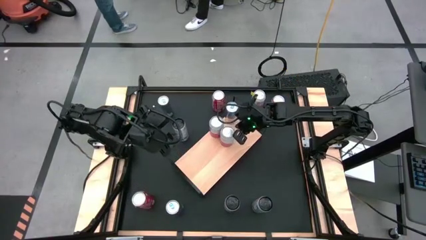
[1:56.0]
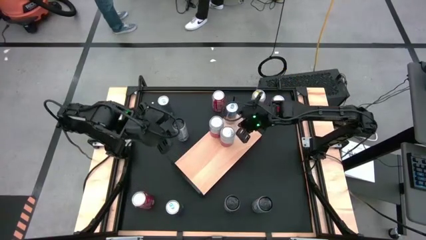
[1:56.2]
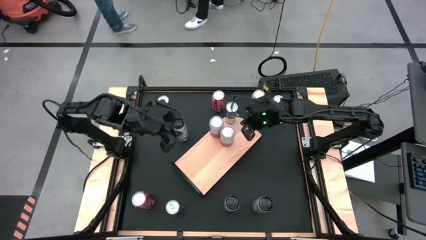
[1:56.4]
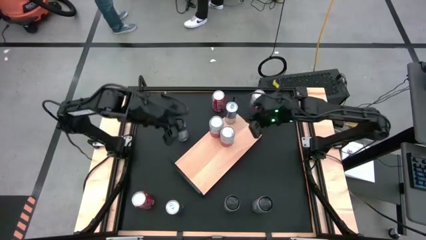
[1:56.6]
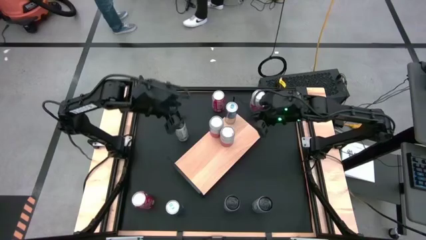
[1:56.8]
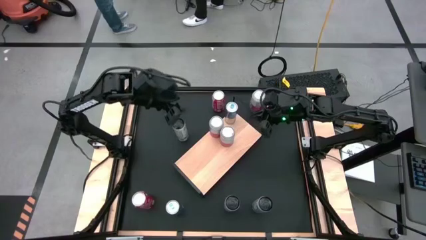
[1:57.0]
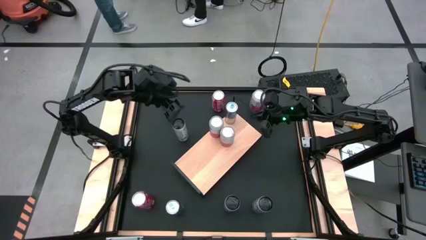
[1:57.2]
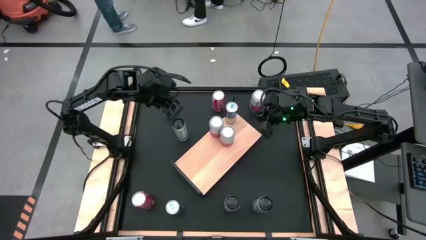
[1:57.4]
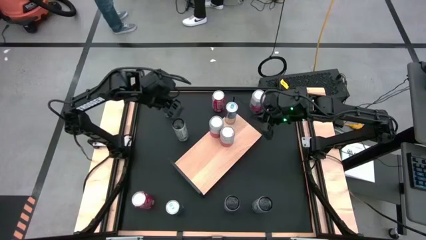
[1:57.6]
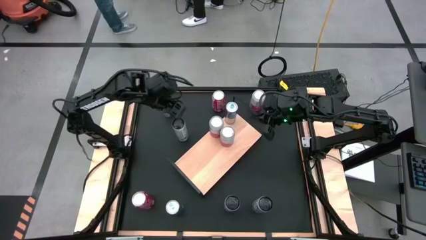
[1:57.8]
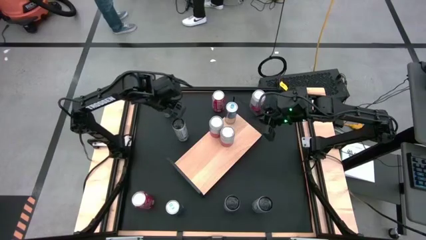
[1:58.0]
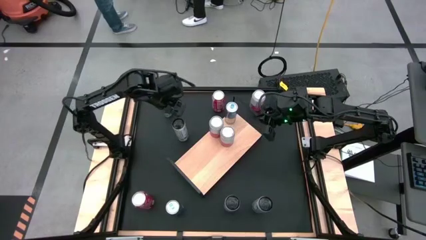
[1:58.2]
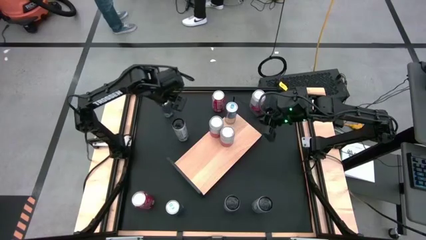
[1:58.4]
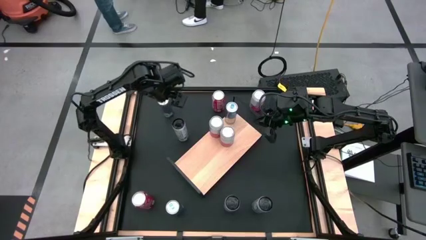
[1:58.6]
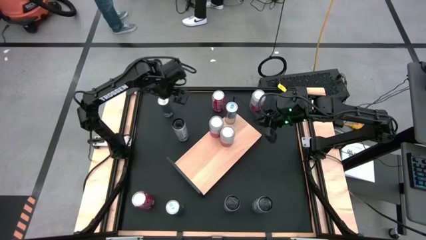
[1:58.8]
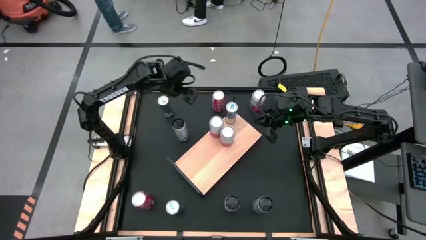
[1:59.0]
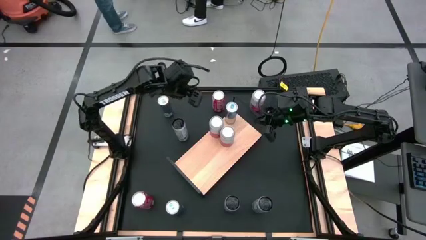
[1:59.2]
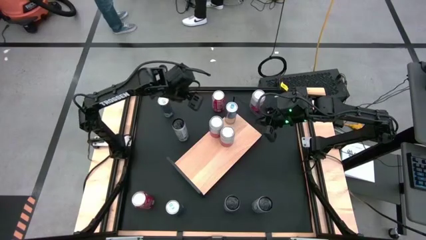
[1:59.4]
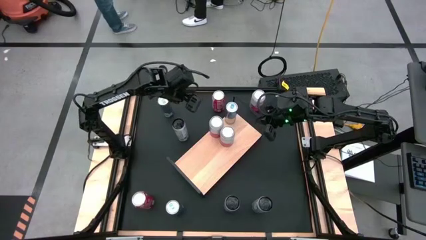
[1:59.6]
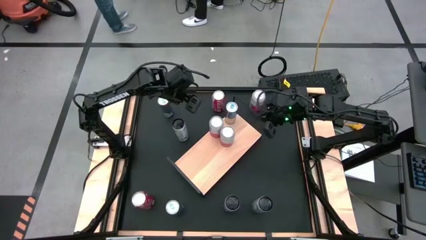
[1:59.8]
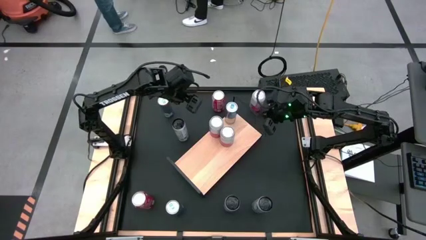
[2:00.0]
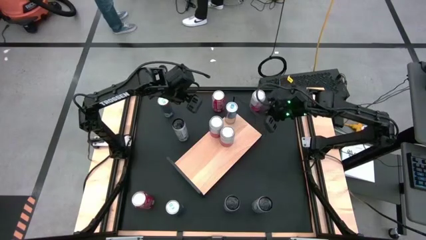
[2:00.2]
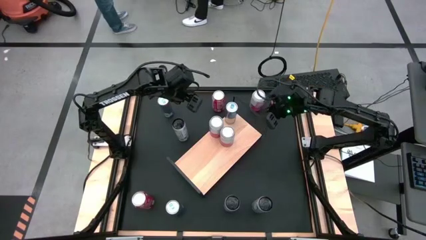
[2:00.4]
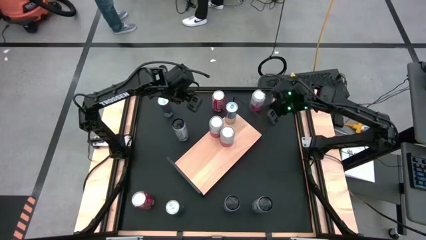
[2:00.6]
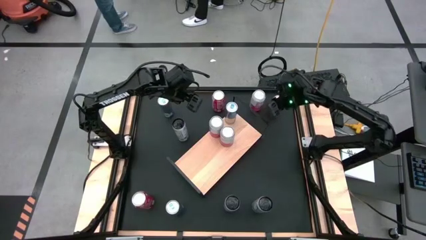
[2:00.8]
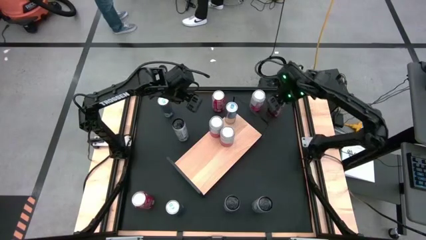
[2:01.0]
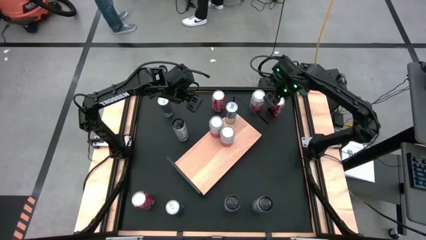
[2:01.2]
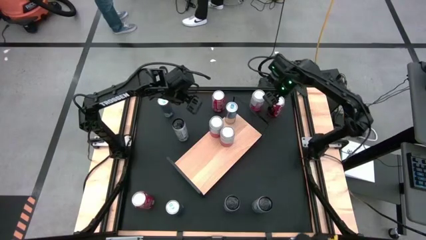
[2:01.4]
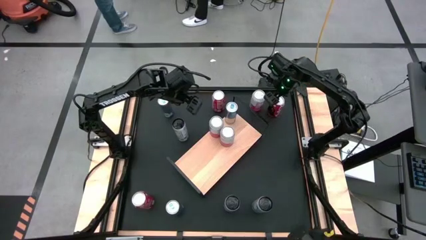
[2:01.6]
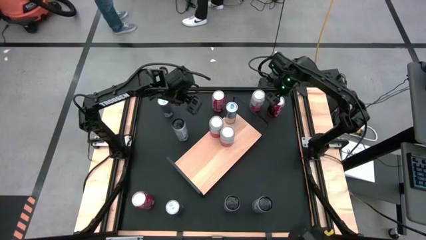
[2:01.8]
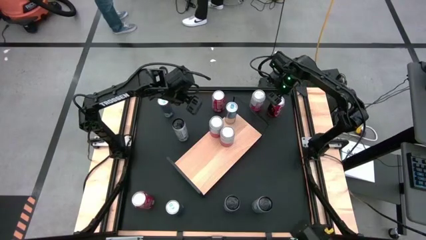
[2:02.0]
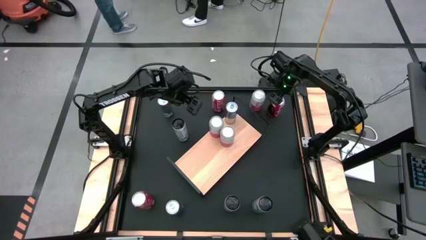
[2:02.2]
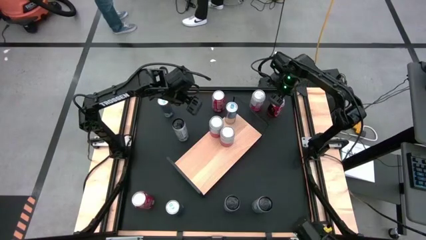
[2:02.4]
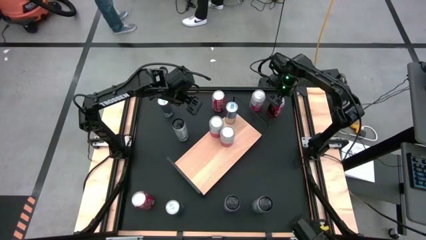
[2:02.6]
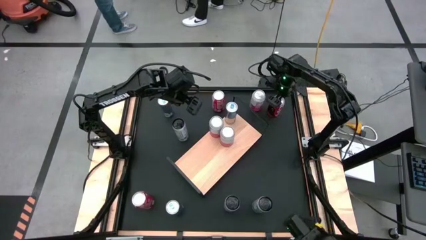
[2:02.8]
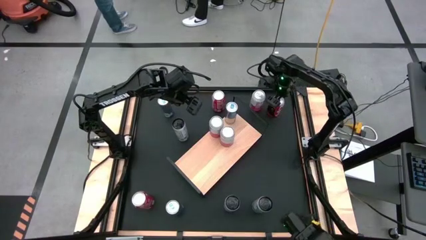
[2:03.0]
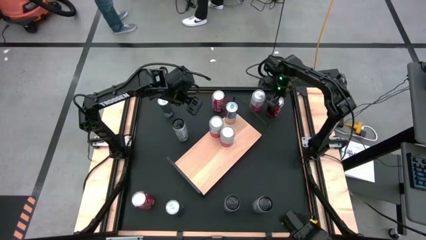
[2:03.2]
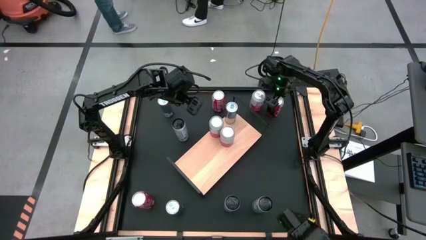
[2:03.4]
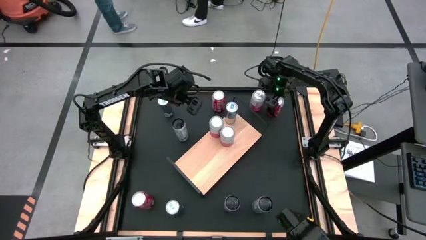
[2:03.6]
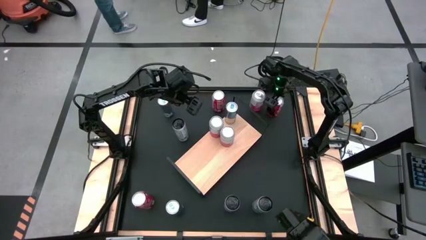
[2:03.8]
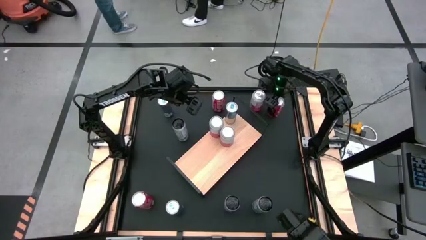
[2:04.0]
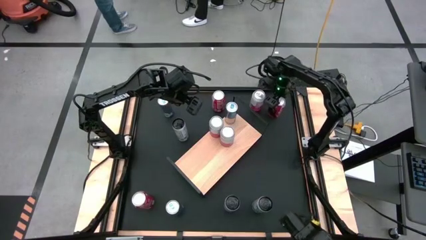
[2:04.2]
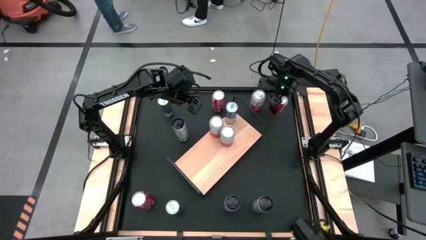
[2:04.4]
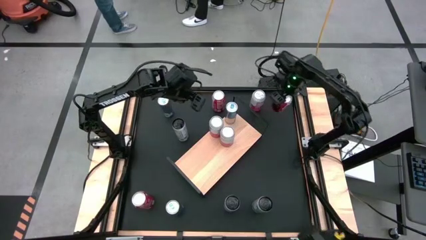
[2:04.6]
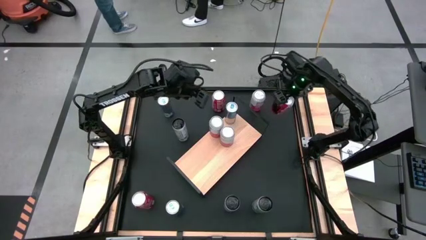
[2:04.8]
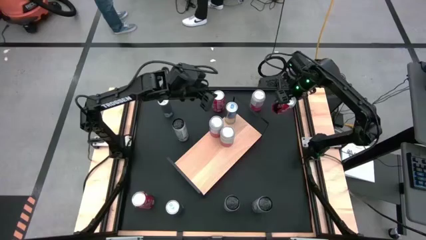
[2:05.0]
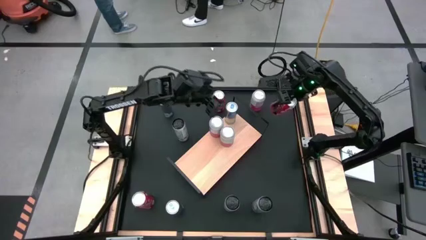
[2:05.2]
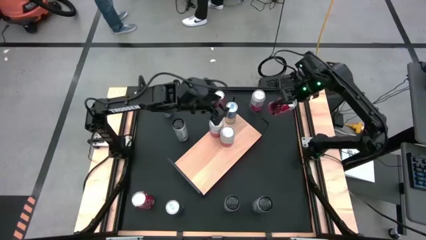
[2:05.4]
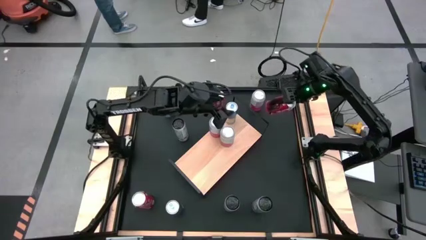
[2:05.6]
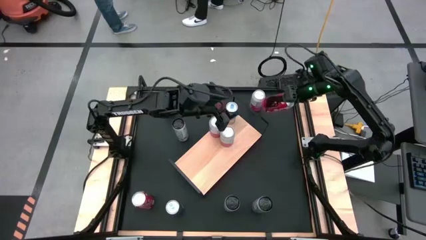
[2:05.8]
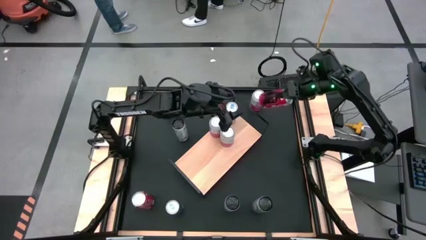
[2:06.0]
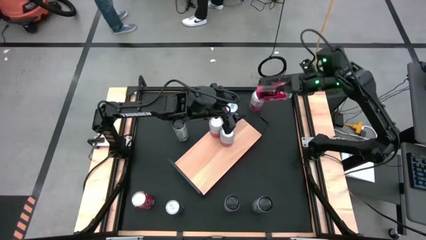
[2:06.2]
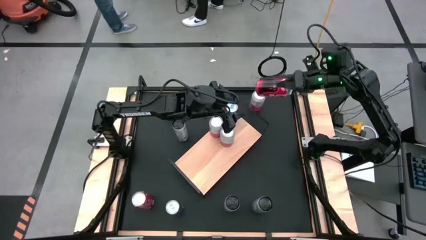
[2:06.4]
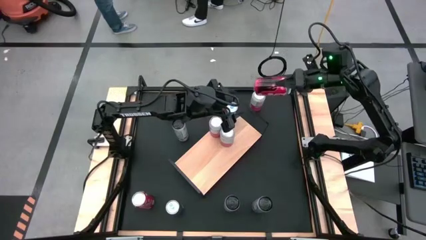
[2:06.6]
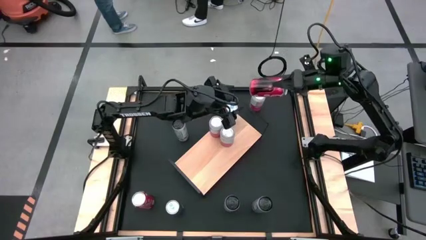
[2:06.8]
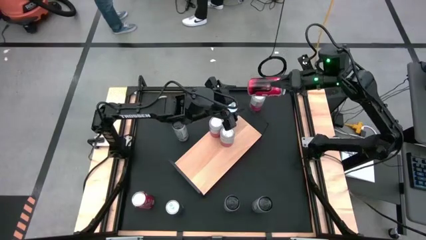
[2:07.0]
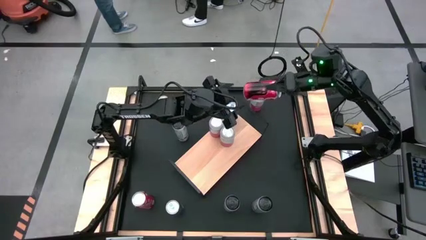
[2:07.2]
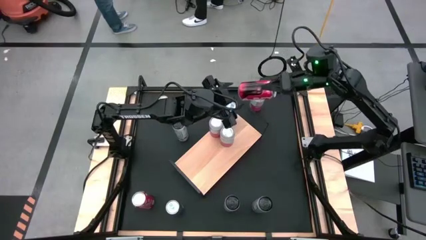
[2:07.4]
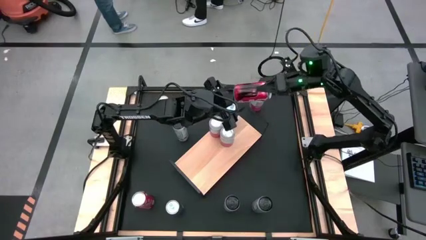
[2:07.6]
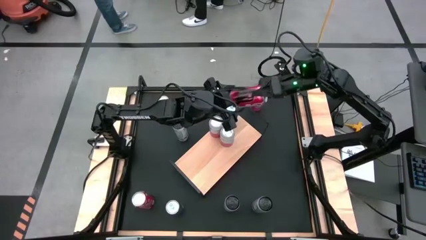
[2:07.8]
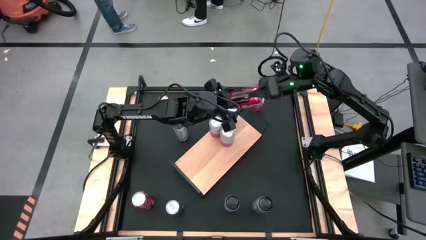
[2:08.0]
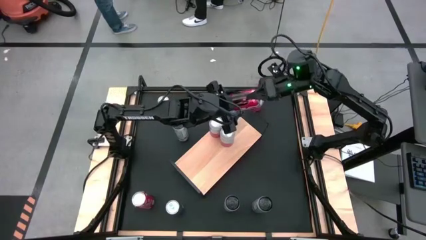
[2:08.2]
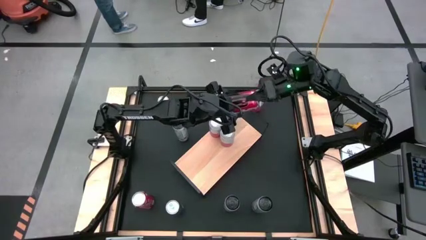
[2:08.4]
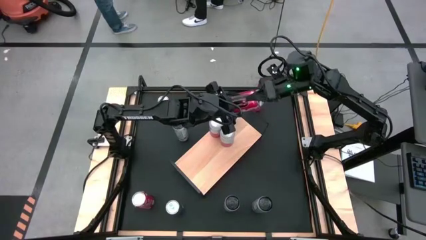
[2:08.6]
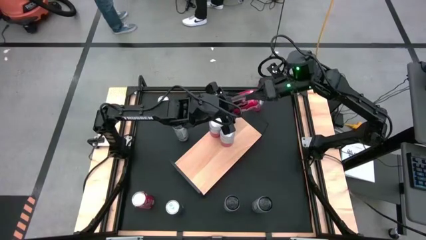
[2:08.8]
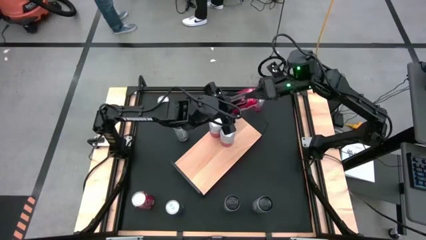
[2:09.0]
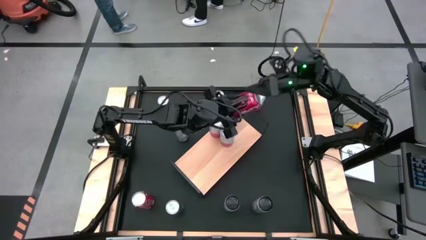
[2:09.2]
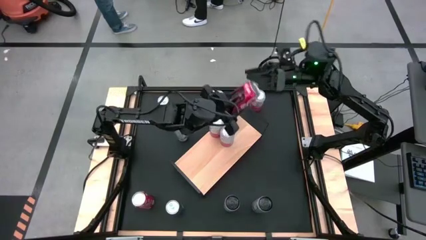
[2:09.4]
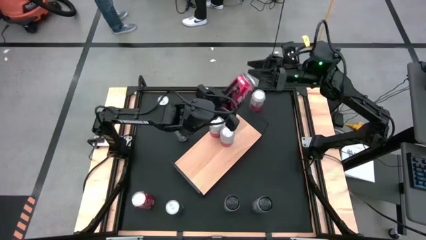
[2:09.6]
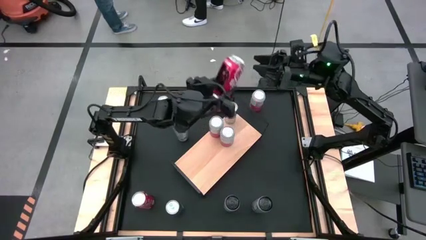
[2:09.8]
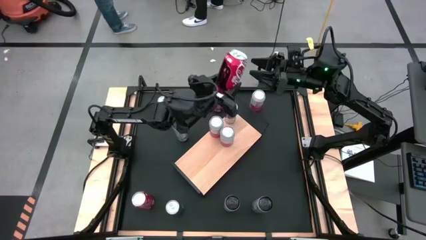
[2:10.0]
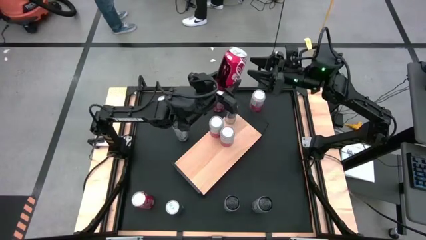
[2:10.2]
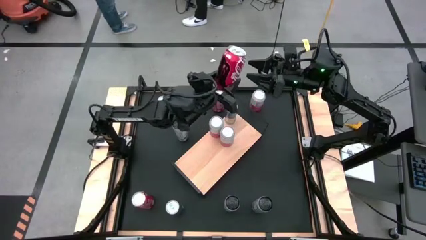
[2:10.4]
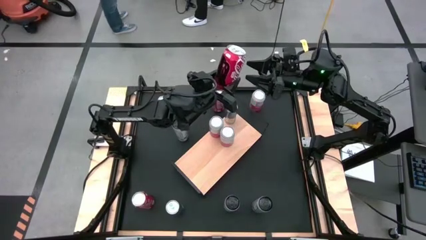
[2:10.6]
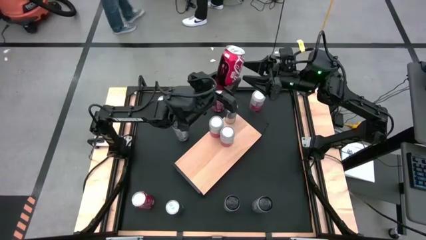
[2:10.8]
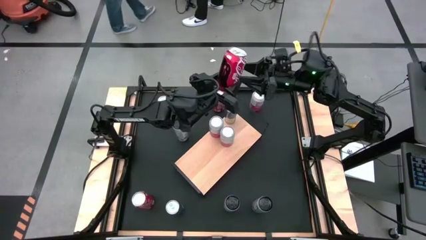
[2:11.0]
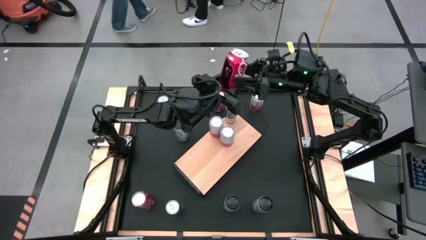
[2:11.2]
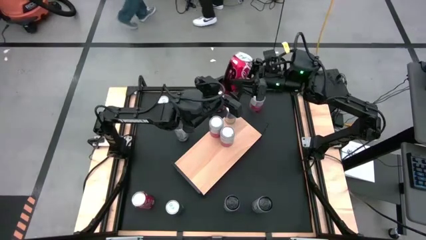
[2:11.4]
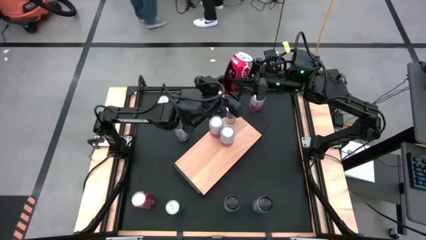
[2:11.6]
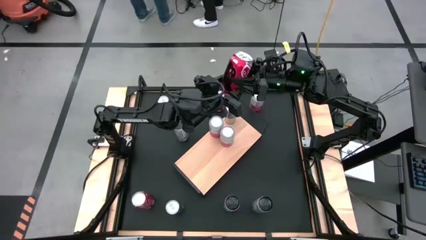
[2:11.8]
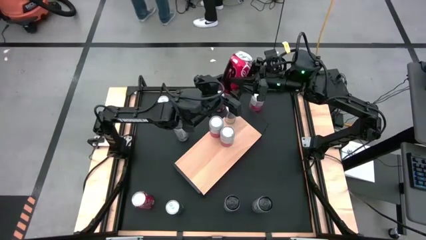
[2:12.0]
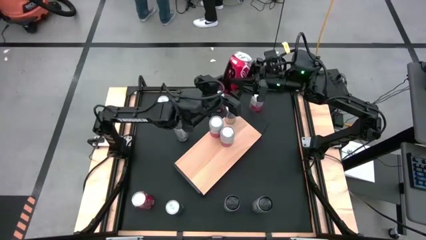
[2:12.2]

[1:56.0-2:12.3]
Task: Place canned beverage on shelf
Put the top right red white soda can on the shelf
